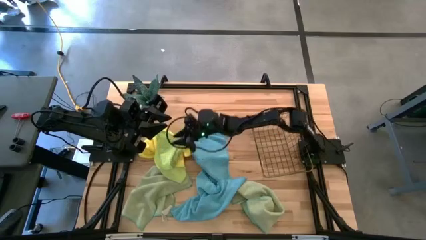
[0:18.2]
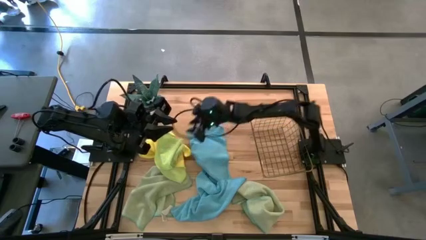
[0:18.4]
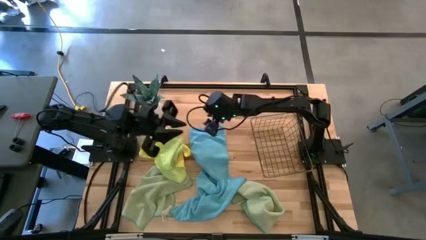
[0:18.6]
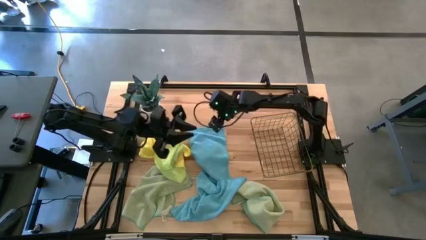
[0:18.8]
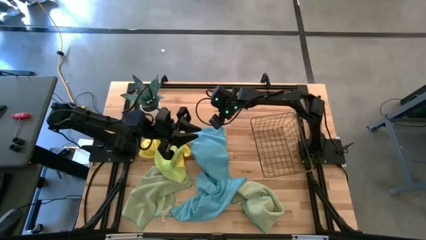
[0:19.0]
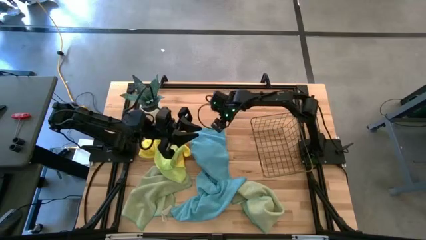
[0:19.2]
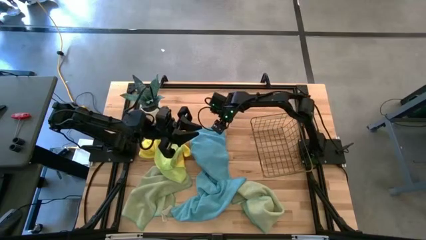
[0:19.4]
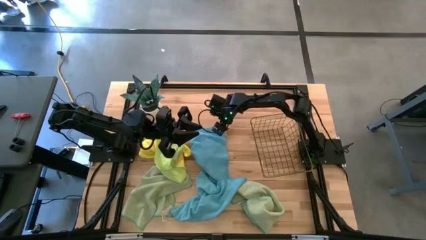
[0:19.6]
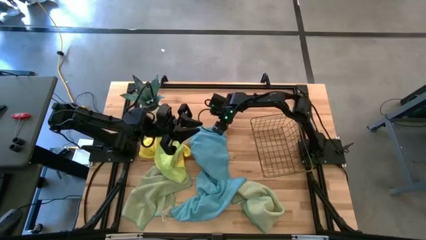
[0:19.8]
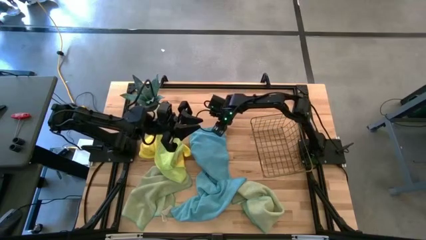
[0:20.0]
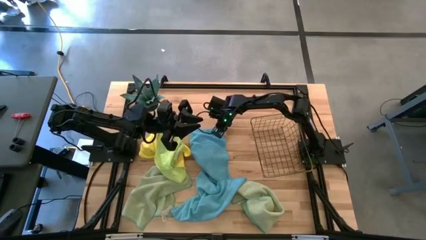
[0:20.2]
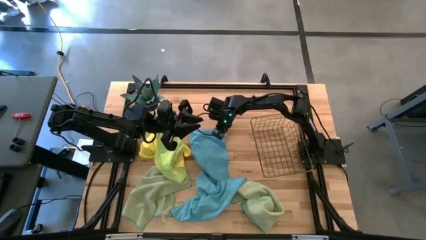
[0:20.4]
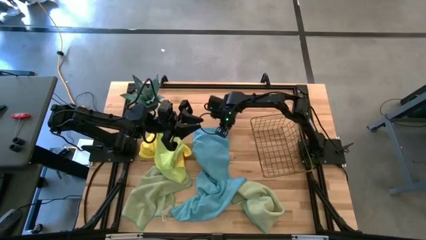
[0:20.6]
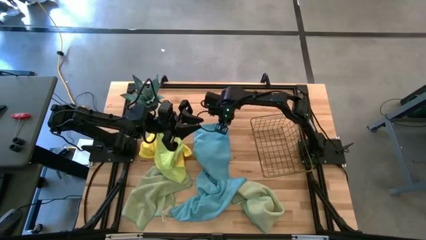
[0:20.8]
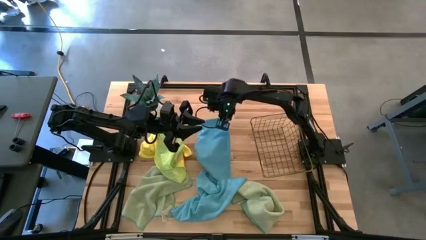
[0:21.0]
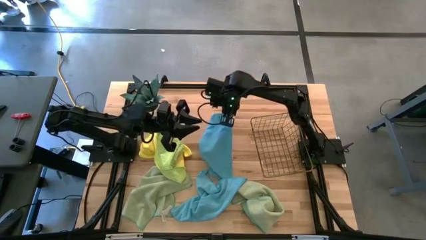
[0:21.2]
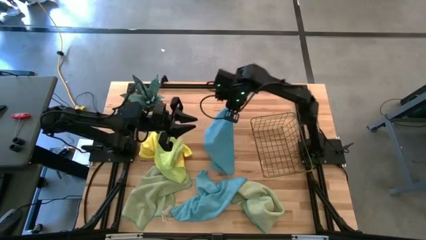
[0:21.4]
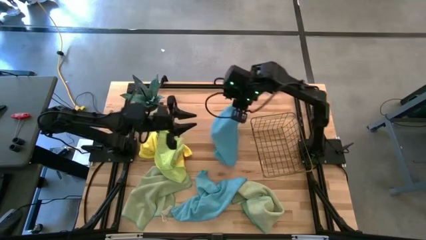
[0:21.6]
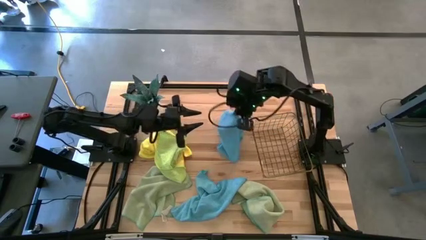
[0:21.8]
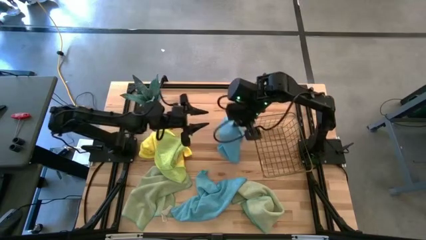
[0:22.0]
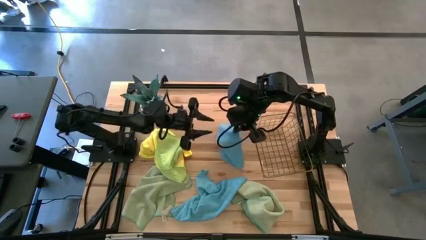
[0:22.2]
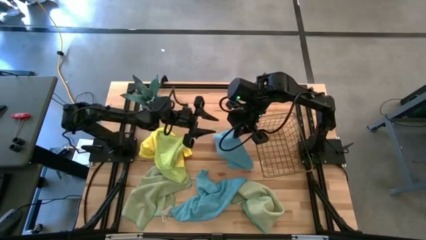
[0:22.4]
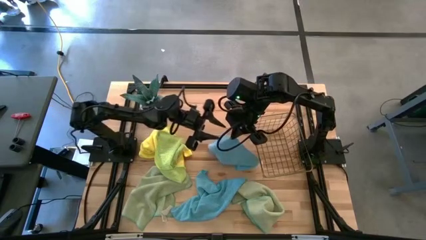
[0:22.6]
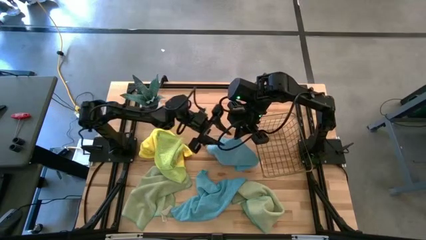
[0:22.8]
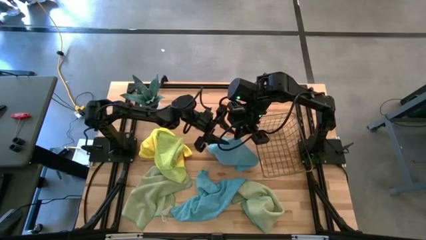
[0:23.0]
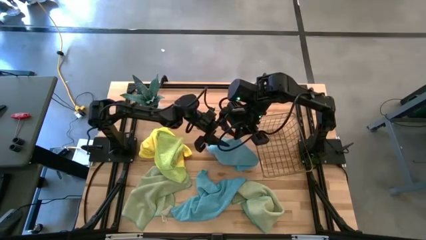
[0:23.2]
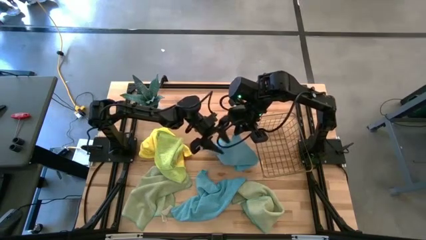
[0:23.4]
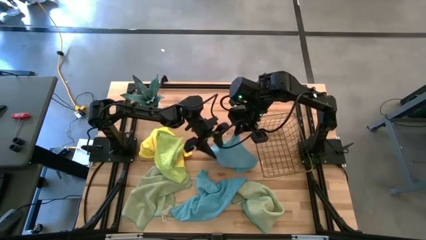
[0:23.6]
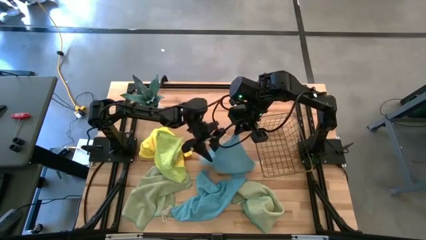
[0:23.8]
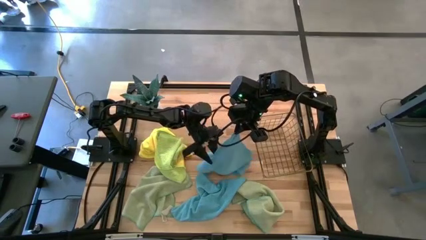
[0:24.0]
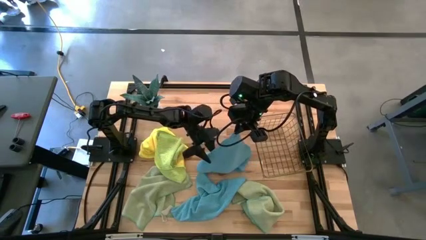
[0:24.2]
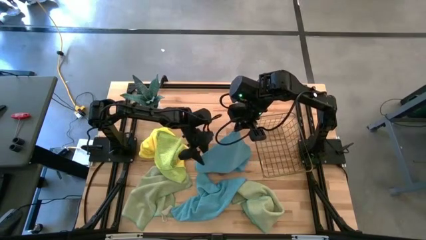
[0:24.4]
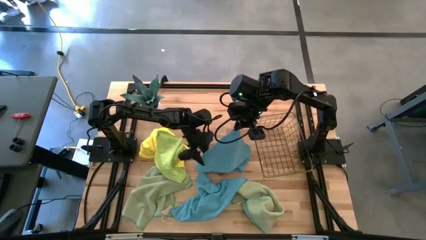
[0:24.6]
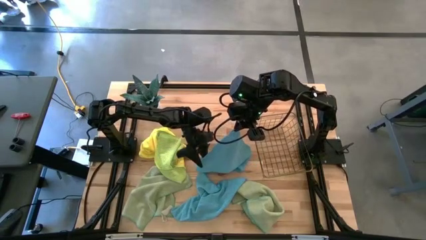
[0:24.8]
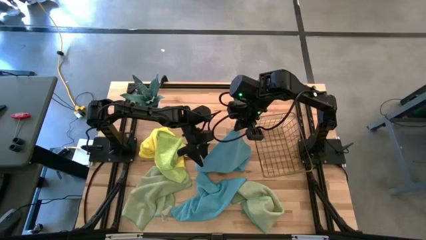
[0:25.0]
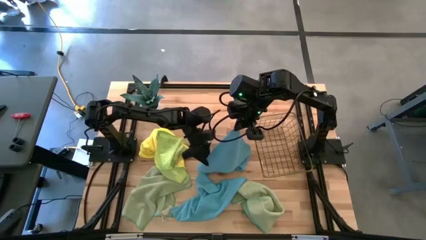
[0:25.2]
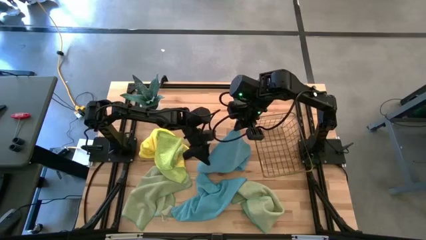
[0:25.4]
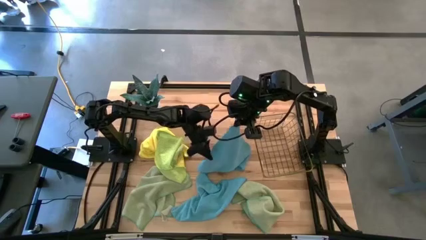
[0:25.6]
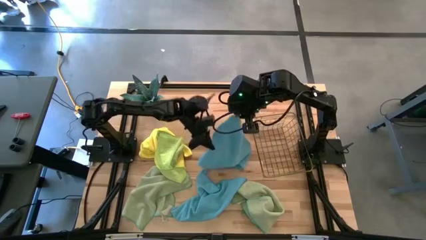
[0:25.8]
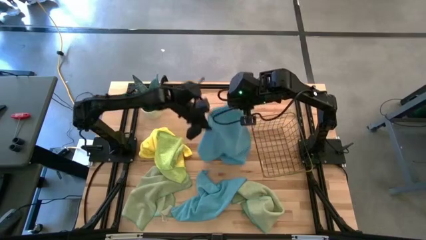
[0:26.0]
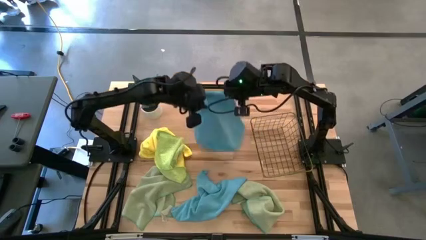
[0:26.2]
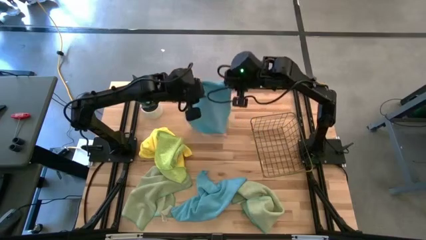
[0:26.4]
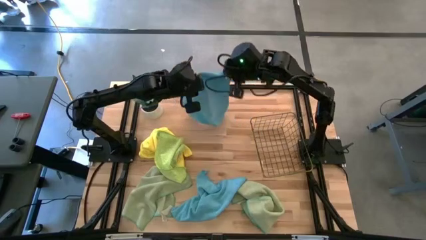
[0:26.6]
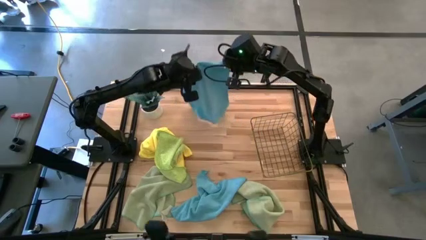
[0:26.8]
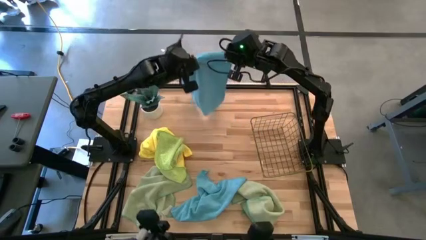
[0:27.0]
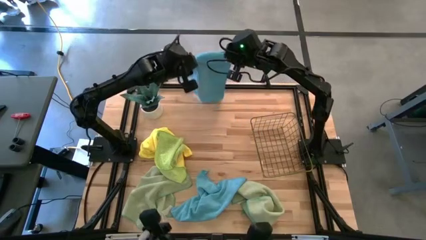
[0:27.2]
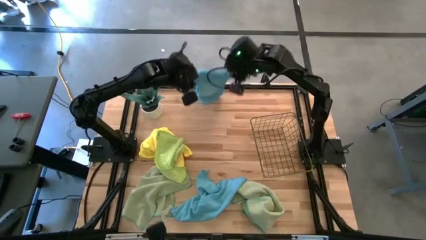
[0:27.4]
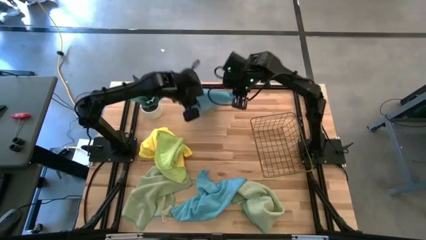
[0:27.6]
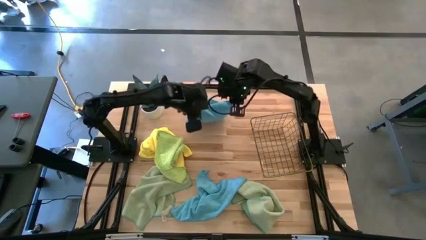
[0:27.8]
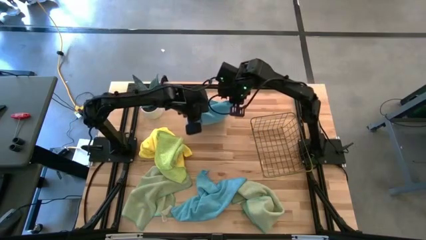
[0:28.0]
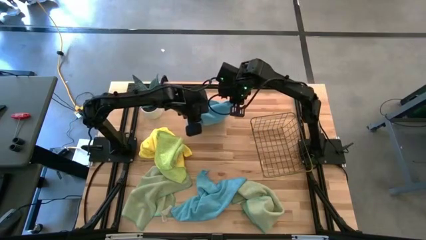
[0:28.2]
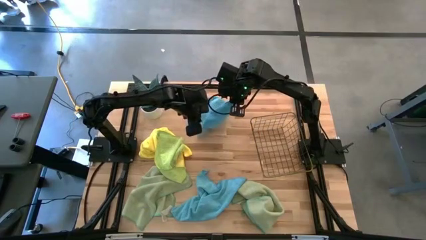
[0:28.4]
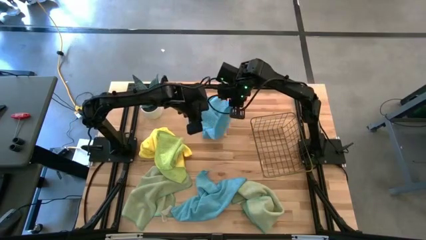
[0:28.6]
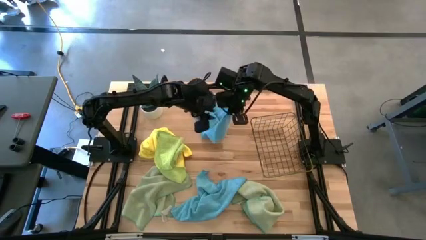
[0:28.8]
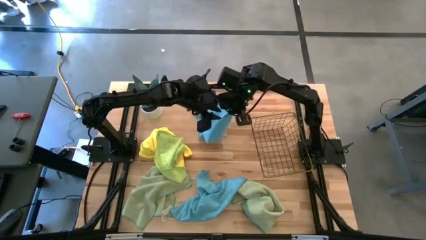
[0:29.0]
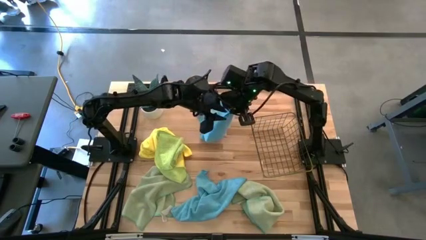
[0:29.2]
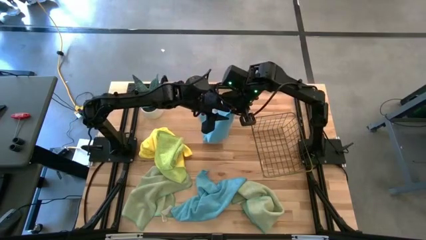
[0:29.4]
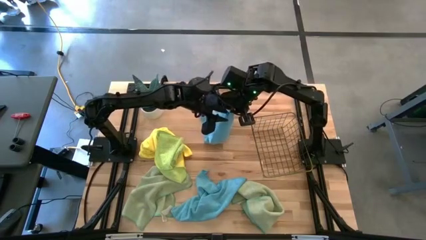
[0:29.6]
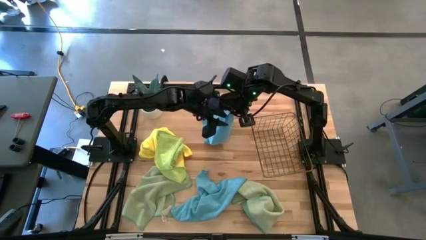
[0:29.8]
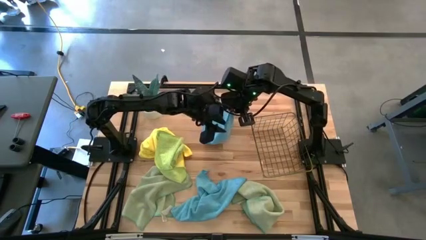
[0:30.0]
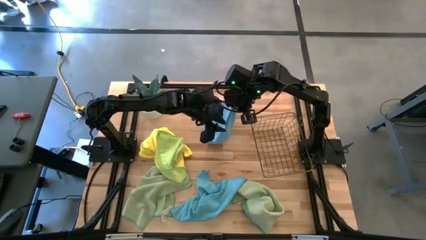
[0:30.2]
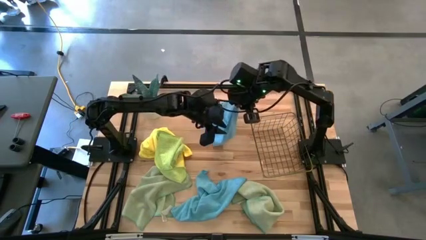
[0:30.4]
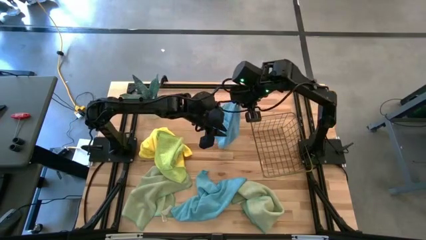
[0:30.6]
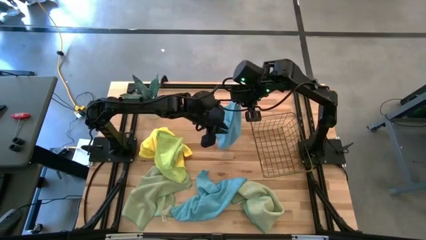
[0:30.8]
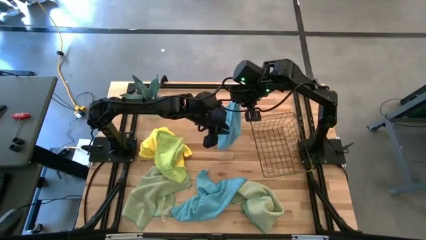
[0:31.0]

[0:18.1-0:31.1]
Task: Fold microfiber towels
Fold the top blue microfiber cloth
